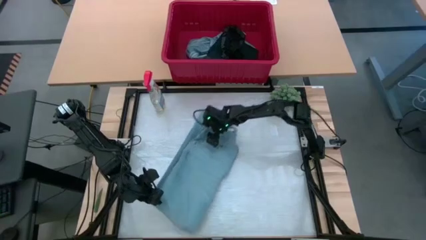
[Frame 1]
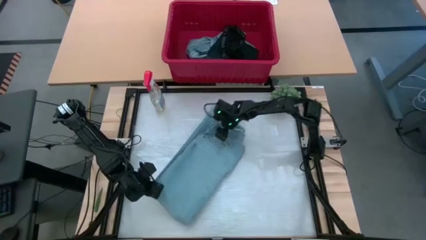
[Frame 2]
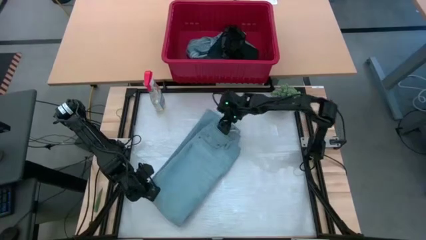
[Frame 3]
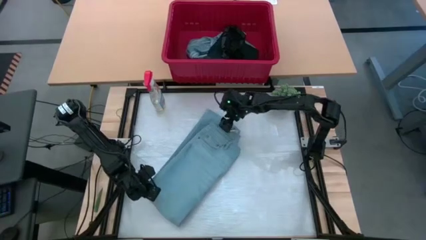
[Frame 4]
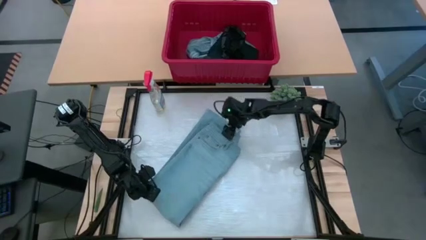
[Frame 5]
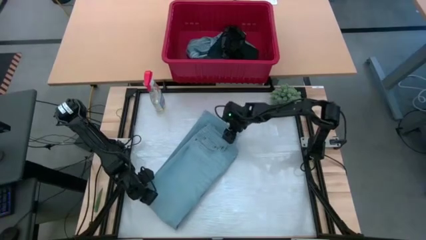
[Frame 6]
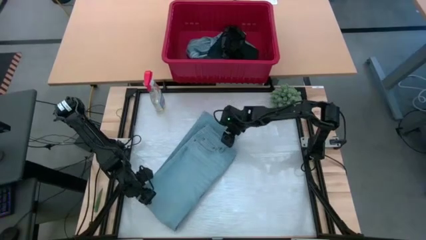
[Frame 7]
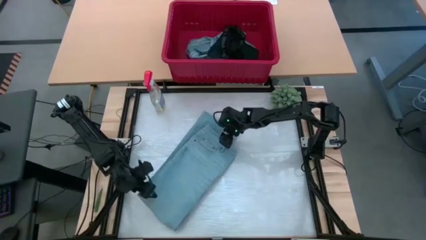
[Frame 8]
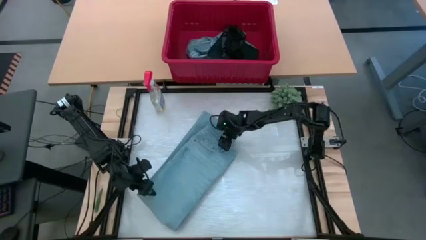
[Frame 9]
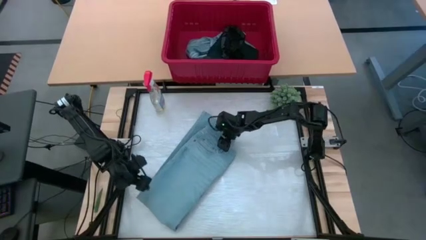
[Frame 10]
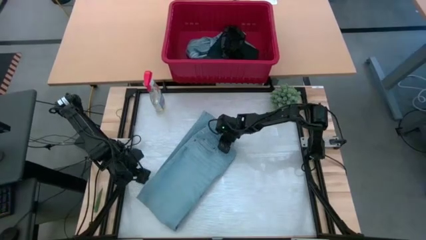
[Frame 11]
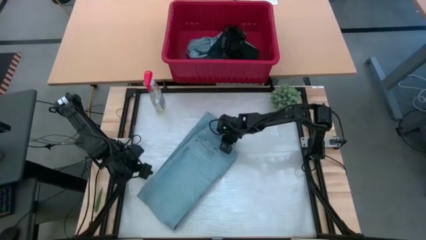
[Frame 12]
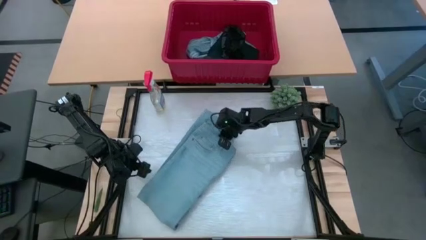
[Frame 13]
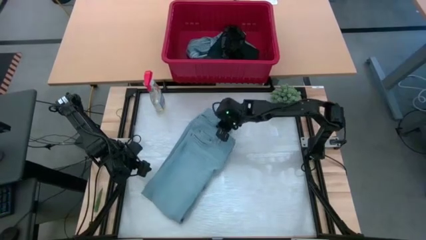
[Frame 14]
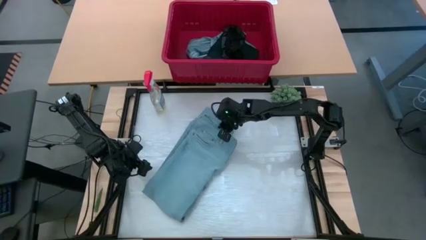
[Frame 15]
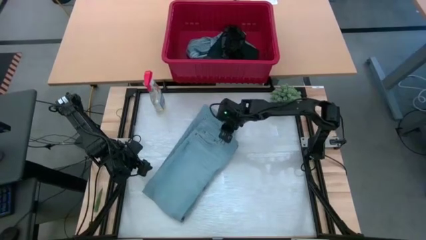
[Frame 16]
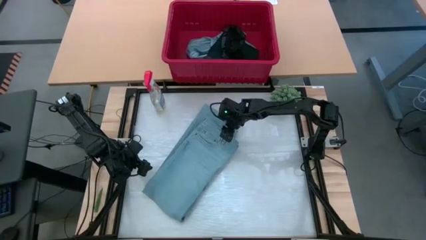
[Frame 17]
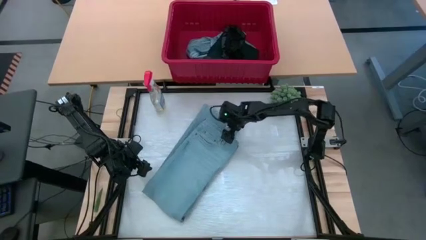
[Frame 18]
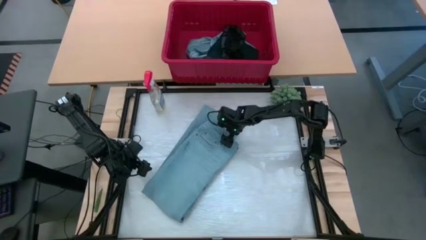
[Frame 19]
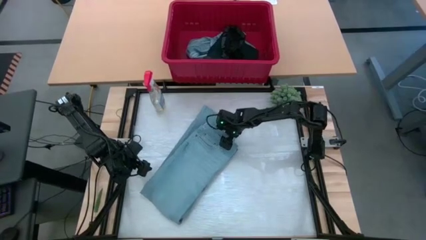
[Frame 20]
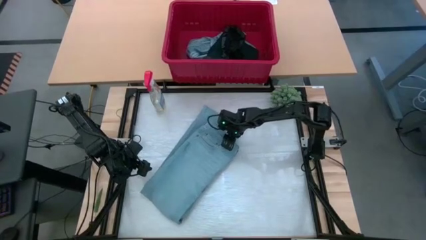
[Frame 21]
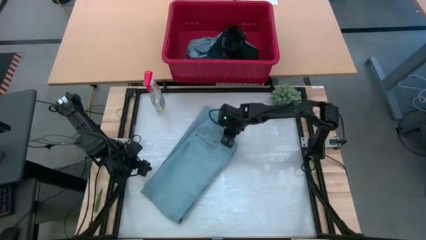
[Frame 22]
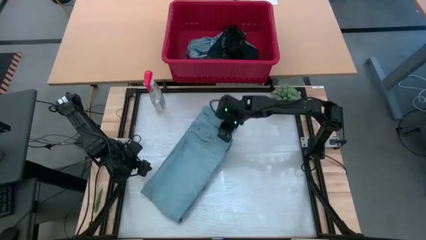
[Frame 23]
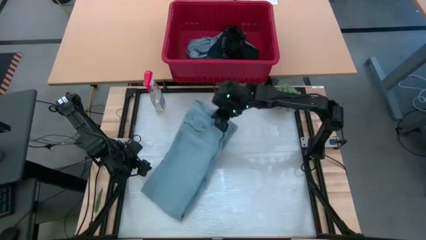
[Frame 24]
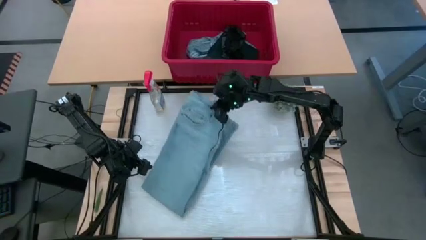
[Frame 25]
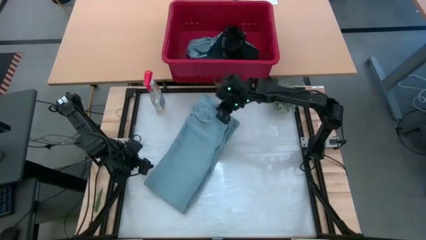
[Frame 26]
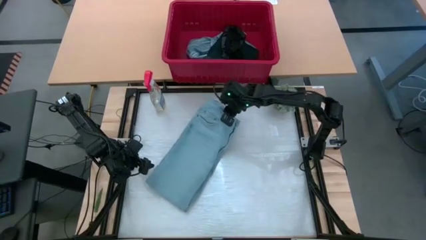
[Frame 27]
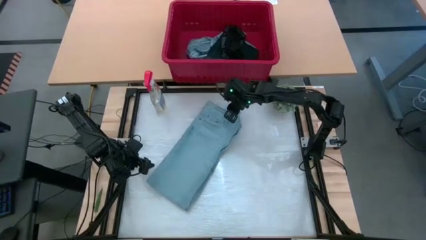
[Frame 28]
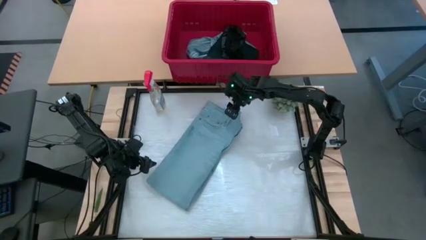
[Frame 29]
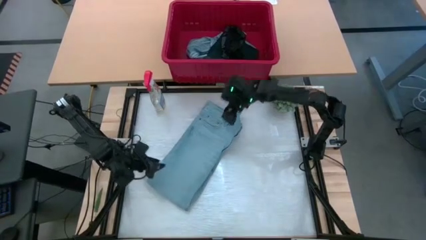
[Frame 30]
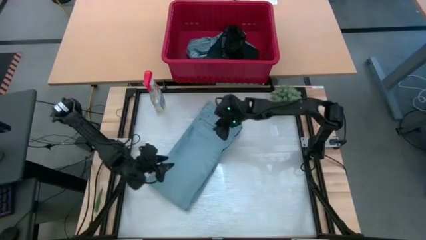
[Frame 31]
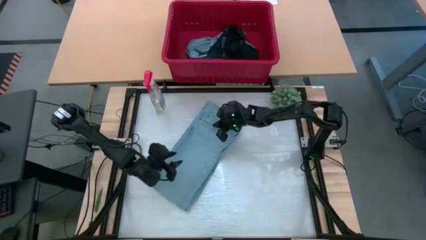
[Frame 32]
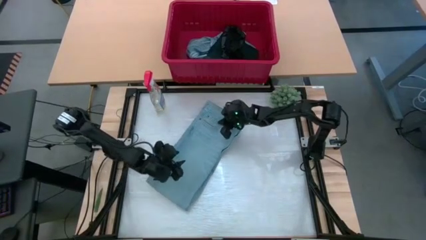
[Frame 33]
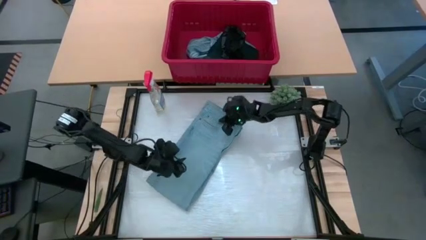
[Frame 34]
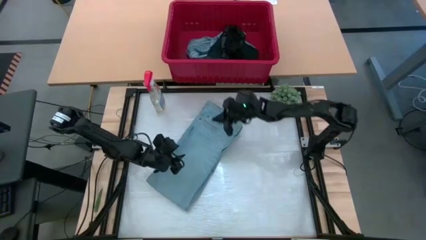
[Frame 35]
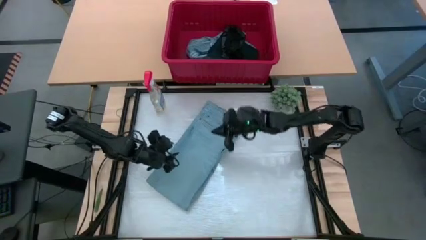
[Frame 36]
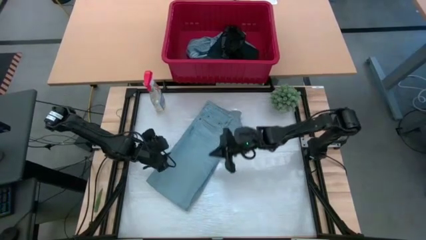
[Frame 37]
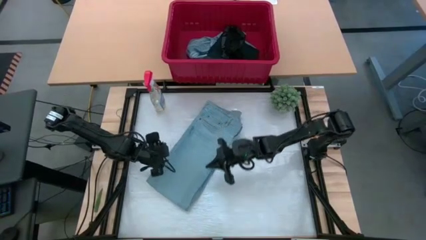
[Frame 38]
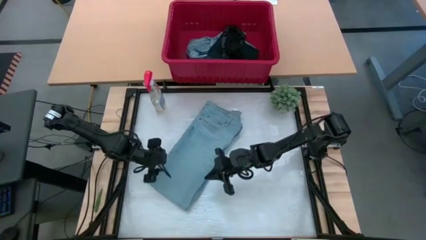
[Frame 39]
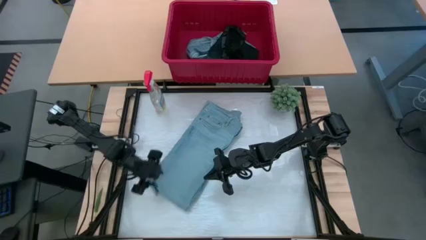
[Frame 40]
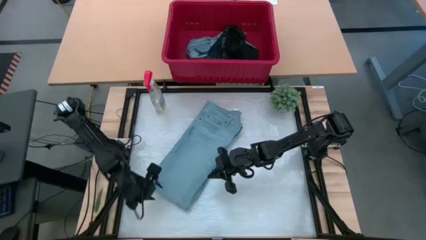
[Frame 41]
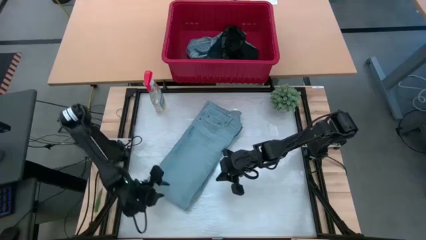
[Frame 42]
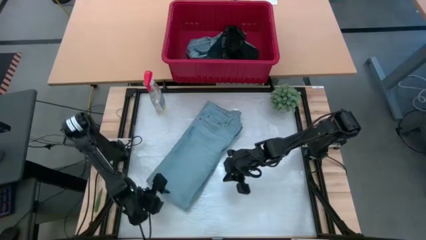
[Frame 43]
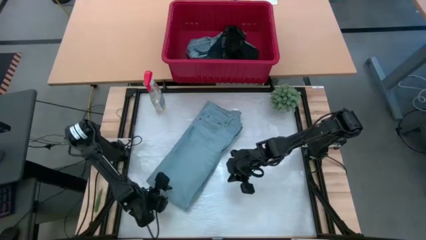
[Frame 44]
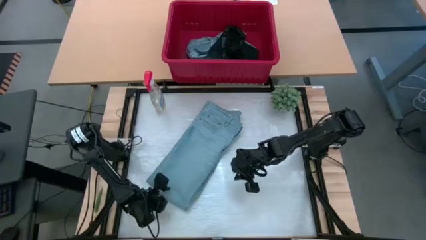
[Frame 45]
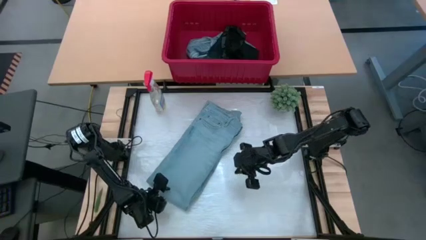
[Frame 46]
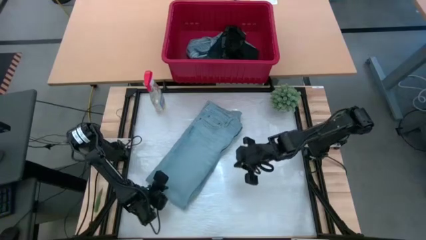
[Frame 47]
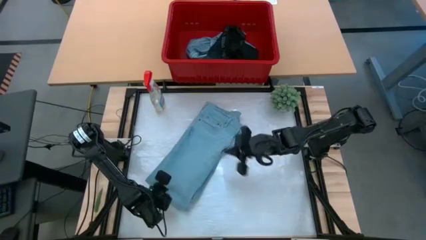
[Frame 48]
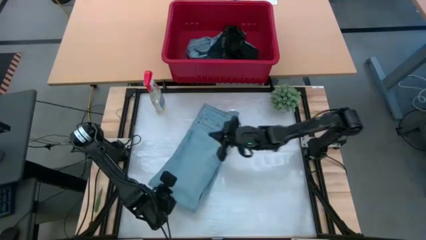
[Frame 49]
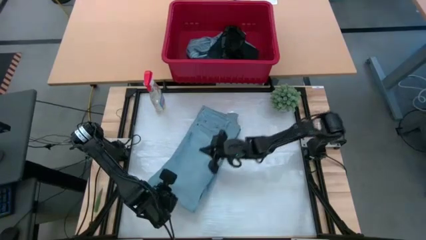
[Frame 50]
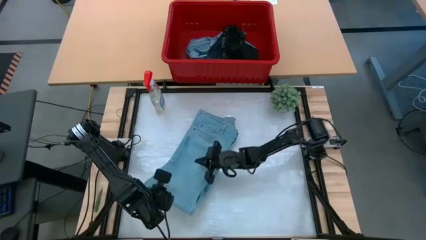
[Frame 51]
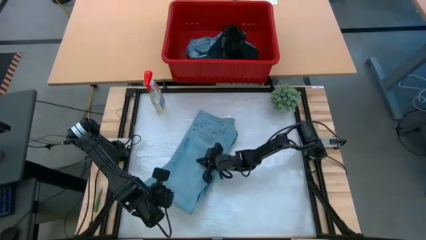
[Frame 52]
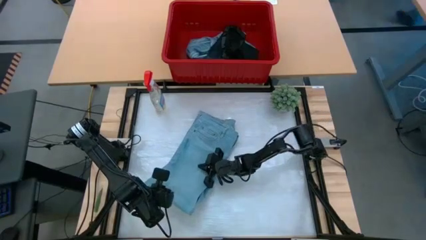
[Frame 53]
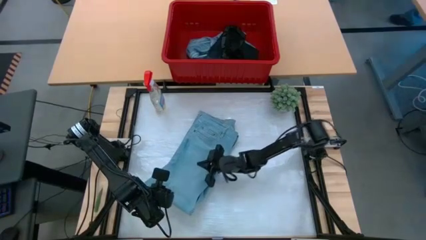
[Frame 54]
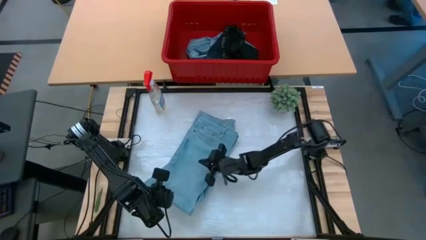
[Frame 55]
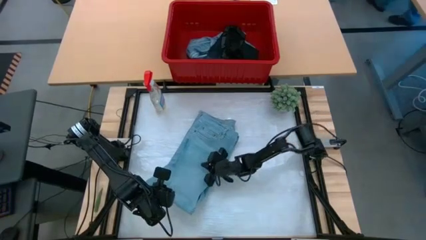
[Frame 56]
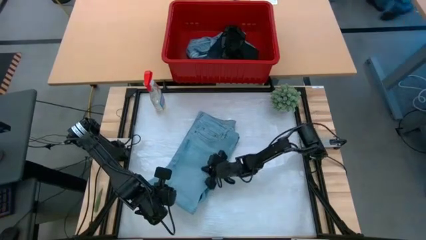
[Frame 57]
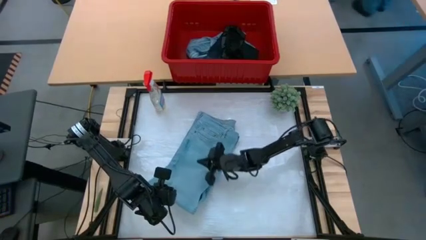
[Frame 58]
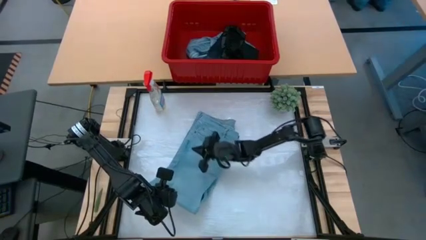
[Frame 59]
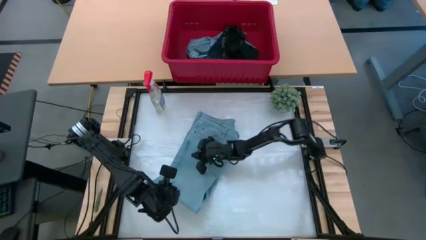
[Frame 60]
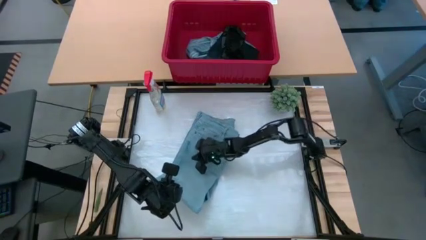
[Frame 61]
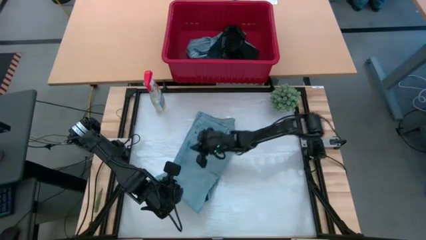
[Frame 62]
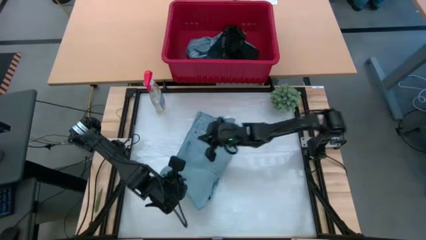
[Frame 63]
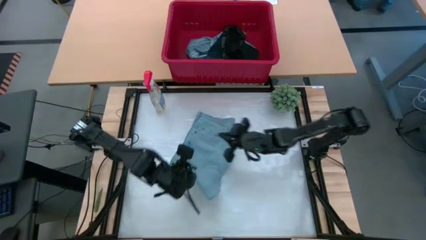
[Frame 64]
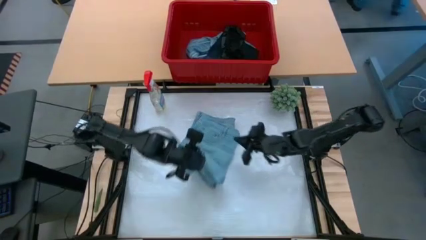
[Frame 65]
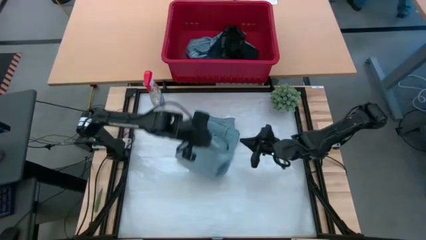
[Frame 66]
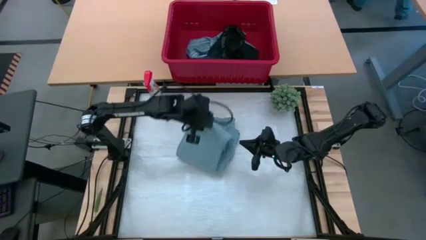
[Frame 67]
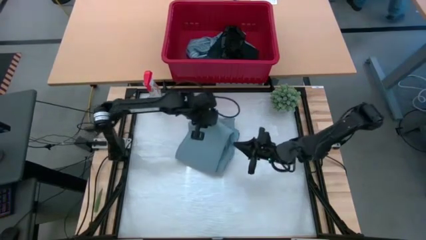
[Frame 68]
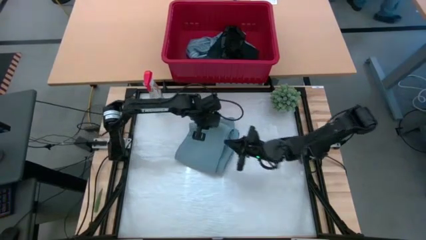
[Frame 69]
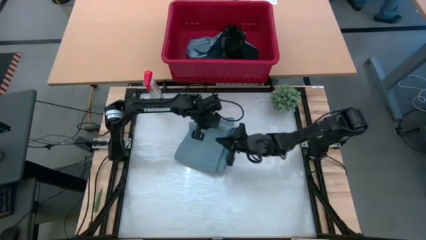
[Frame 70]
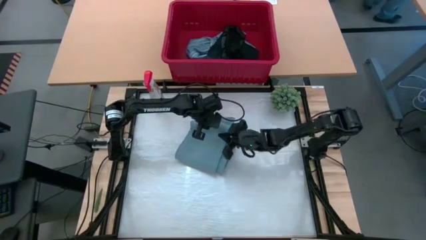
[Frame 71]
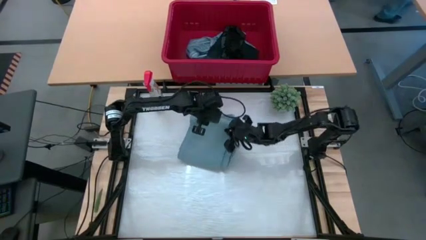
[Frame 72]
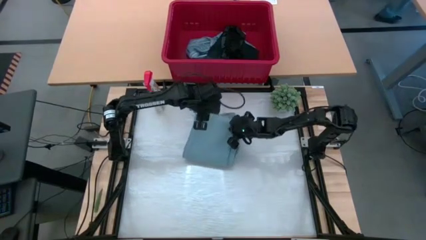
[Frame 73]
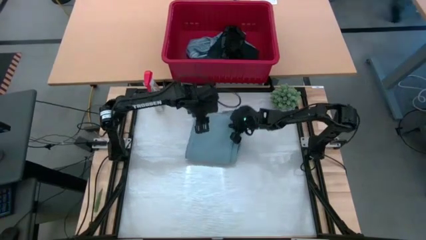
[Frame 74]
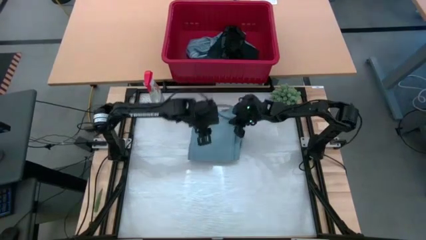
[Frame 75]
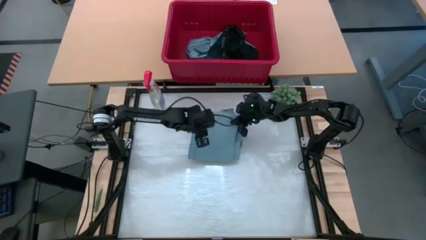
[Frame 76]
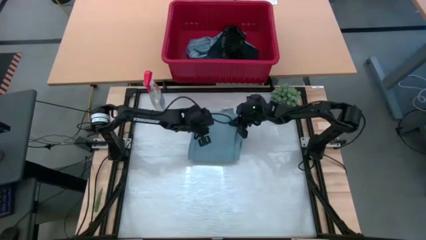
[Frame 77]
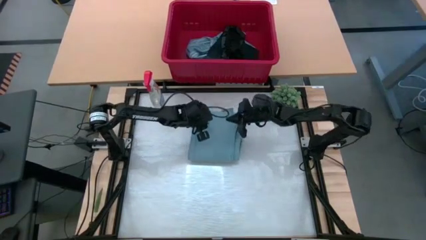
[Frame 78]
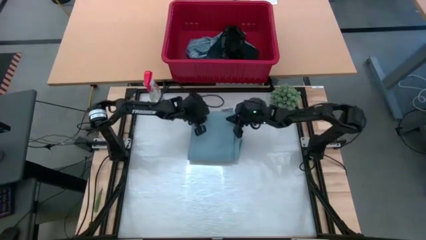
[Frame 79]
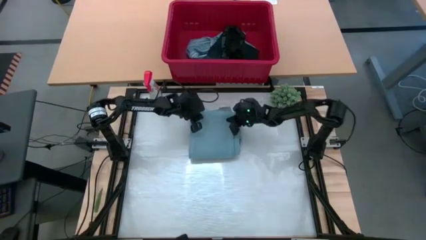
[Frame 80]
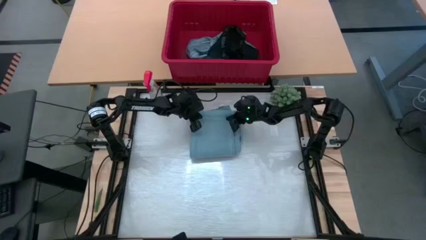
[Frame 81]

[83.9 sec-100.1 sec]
Task: Fold Laundry from Bin
Fold the blue pants from the red laundry bin
